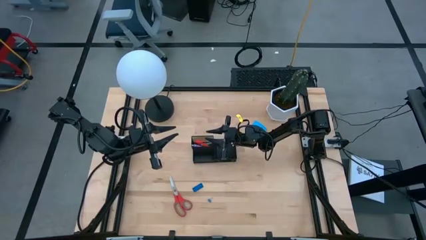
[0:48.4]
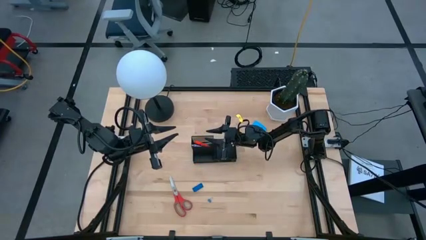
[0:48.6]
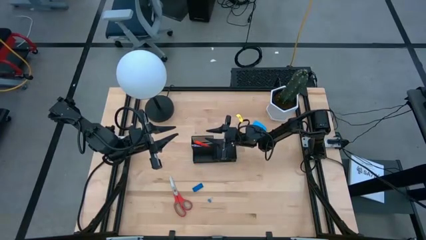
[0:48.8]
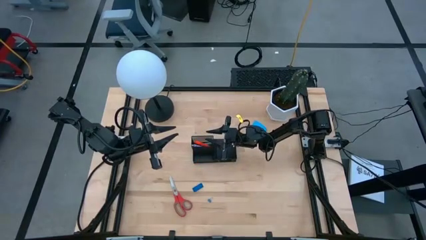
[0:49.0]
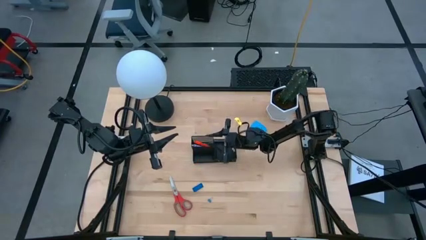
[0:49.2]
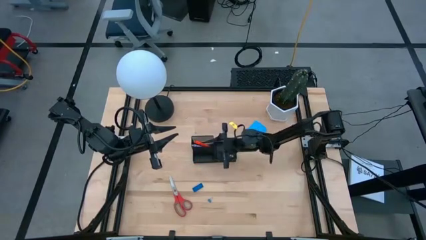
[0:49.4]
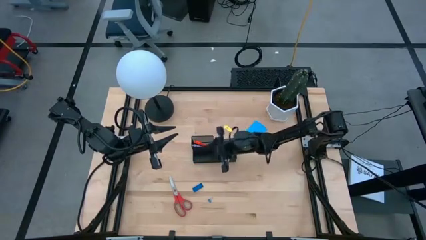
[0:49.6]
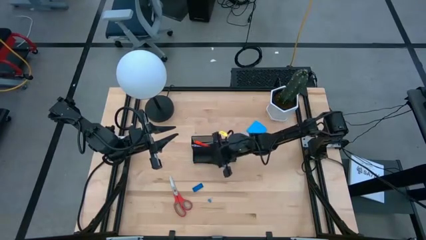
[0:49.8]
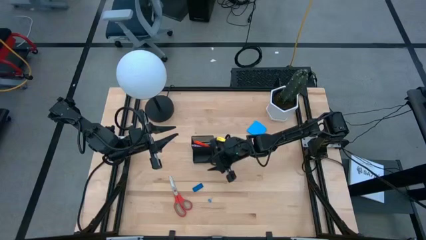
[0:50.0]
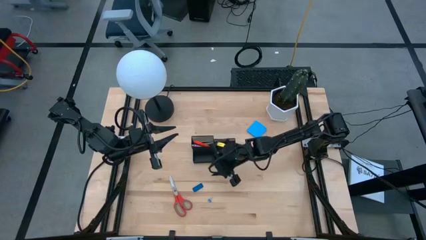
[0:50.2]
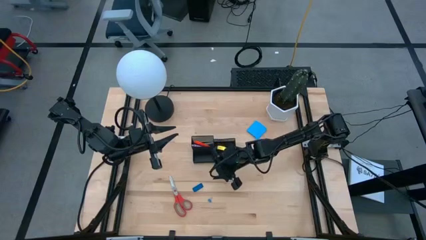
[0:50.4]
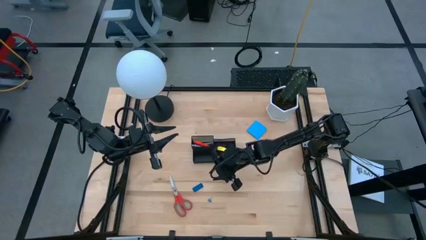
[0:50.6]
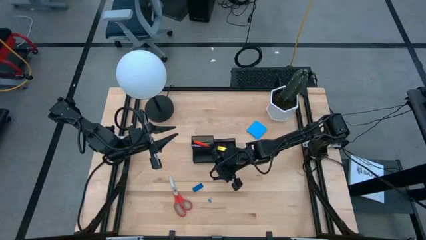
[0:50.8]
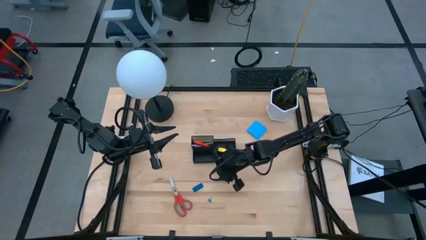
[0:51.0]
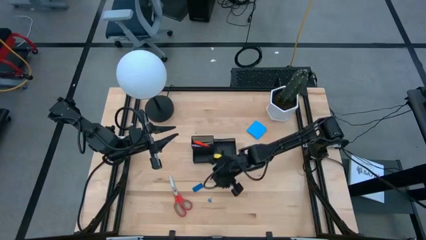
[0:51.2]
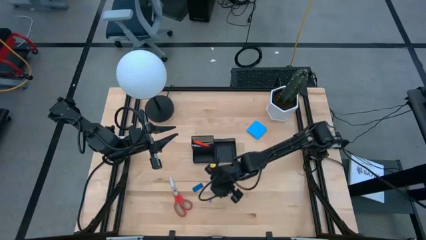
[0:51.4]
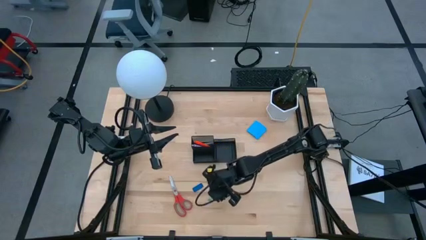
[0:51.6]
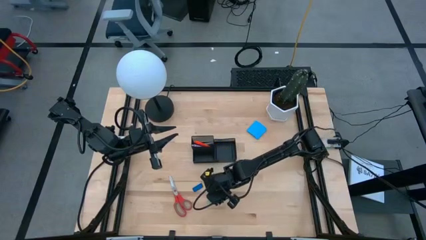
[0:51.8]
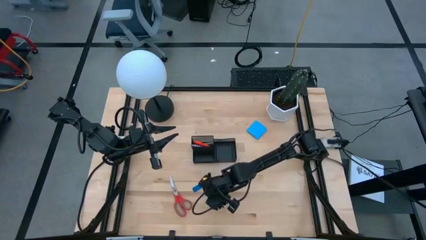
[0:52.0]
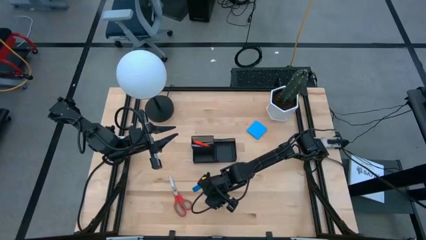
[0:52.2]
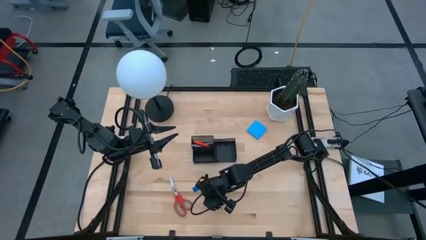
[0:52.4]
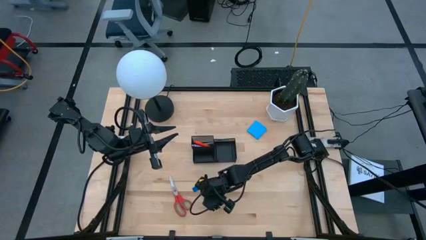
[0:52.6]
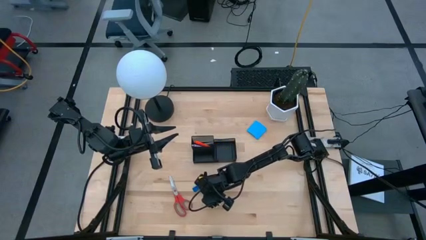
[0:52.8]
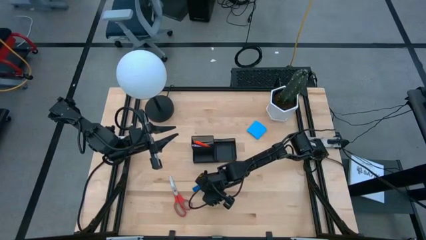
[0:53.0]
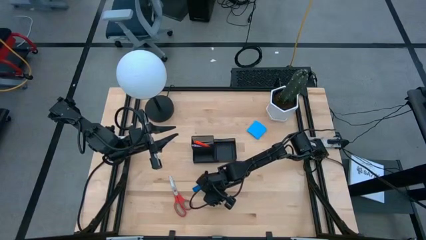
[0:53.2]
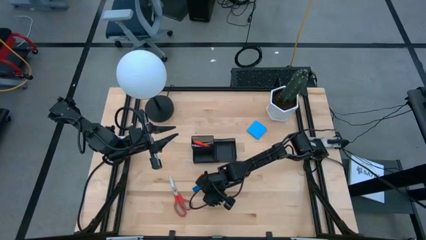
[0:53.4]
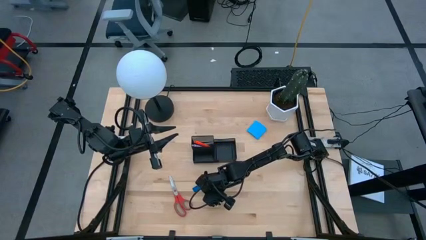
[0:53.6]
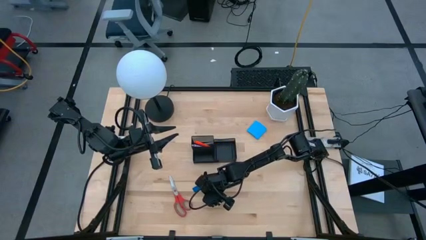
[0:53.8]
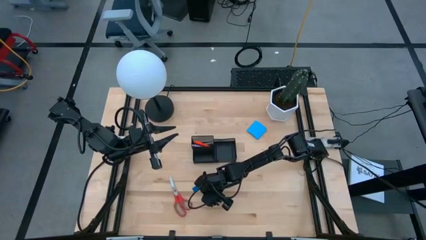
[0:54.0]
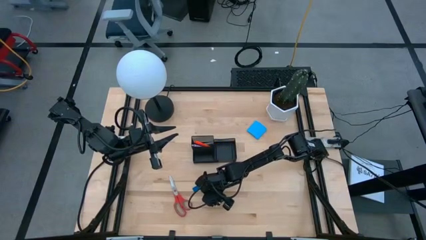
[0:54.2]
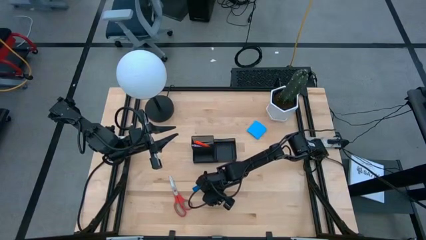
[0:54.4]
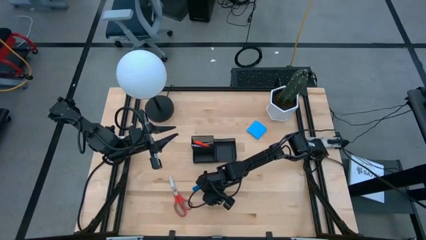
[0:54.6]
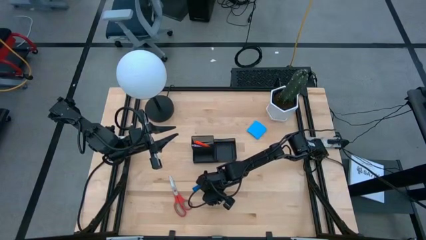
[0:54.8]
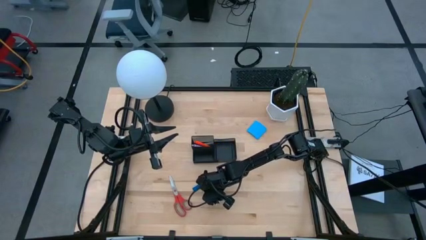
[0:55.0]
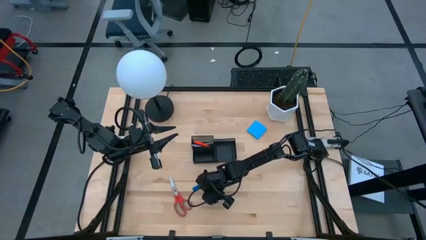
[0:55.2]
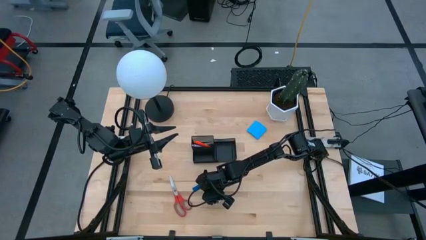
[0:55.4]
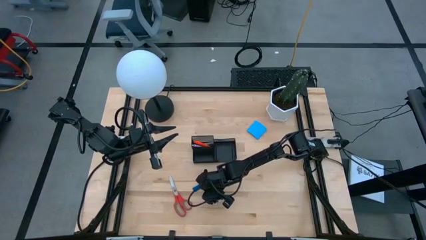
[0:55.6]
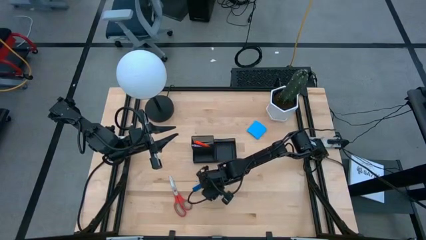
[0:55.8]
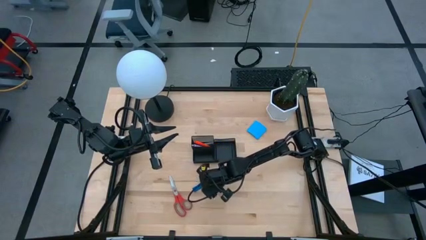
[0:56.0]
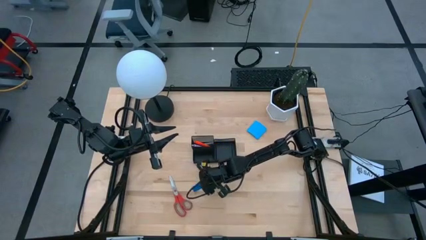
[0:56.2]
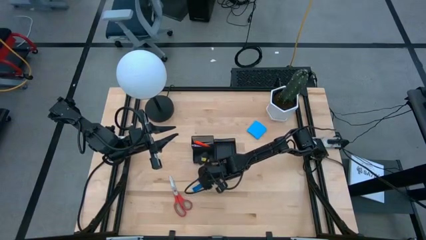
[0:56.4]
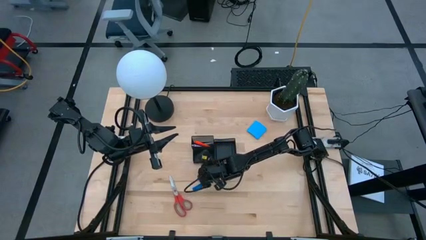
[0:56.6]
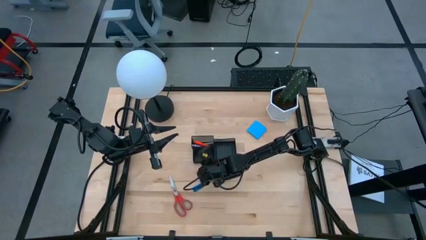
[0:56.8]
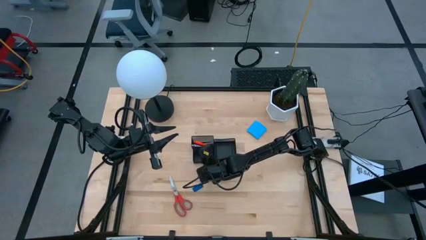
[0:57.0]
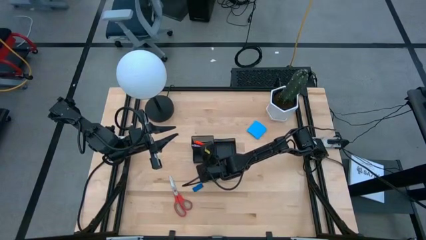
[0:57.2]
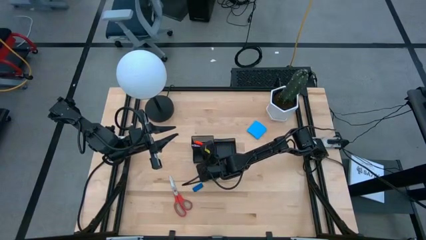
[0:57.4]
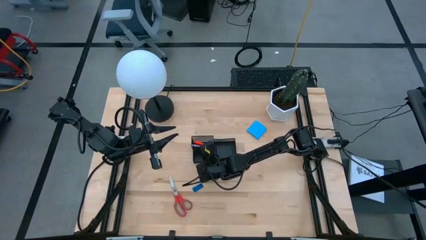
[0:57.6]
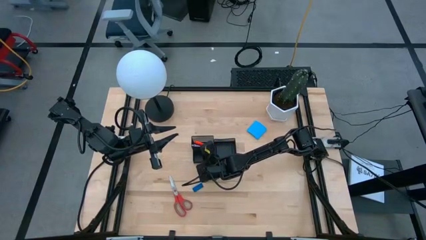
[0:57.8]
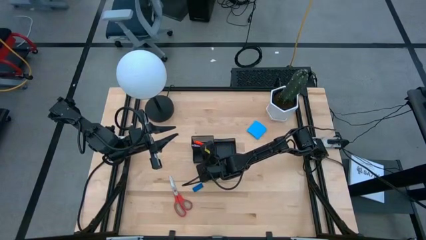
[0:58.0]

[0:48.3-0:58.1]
Task: Pick and place office supplies into organizer
Put the blue binder clip into the black desk organizer

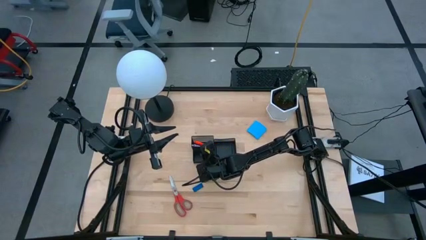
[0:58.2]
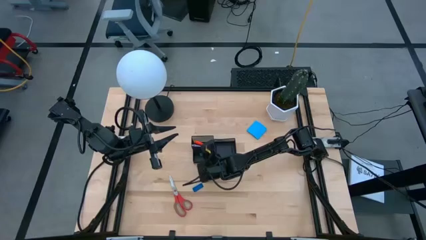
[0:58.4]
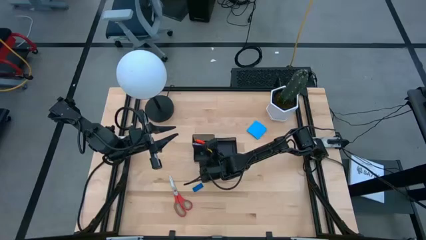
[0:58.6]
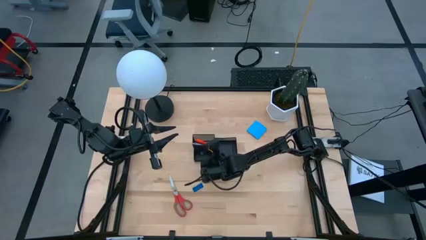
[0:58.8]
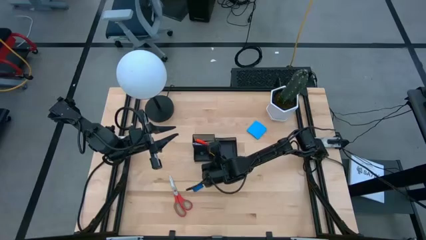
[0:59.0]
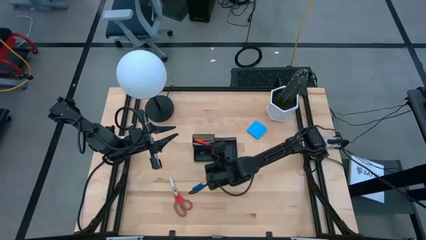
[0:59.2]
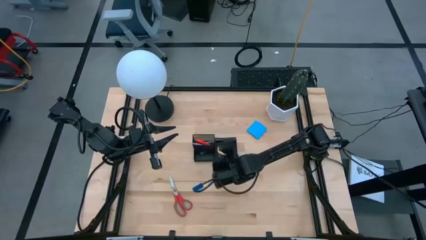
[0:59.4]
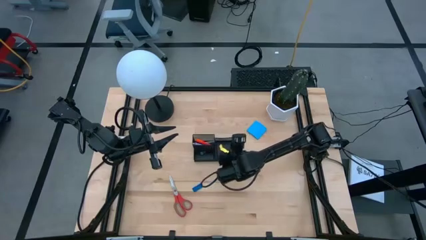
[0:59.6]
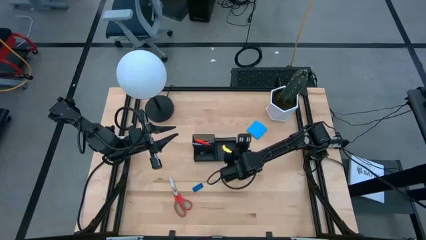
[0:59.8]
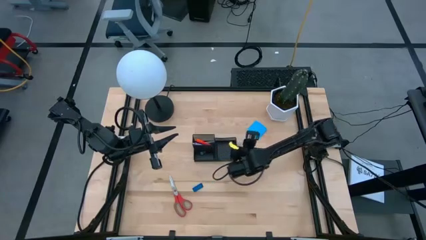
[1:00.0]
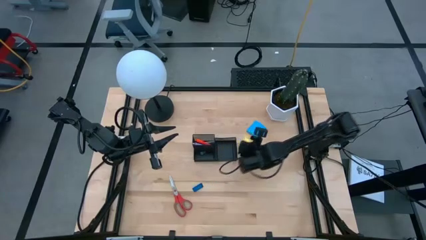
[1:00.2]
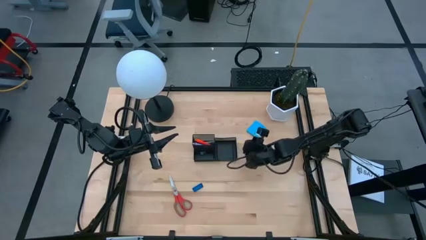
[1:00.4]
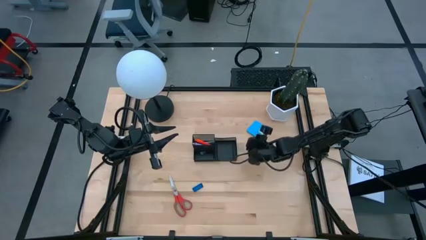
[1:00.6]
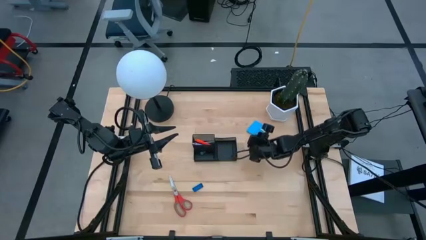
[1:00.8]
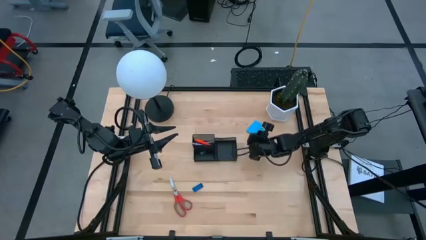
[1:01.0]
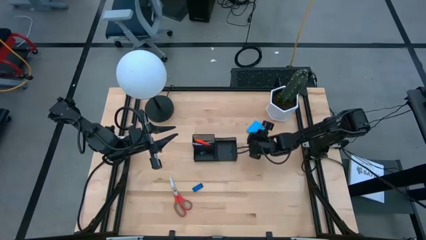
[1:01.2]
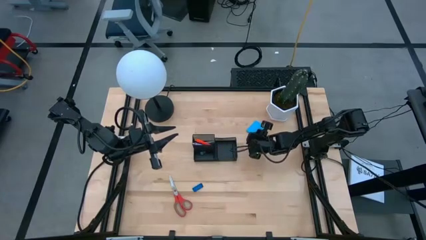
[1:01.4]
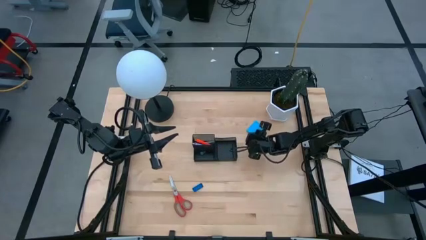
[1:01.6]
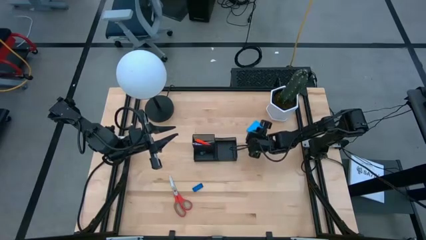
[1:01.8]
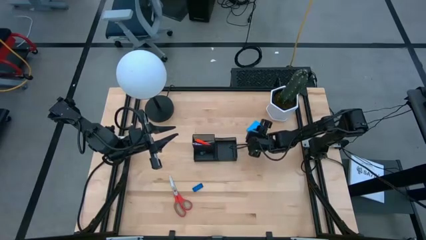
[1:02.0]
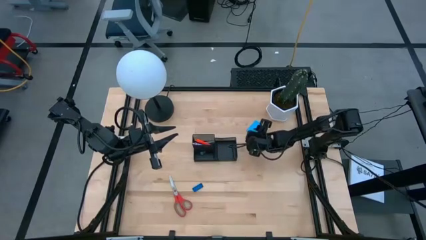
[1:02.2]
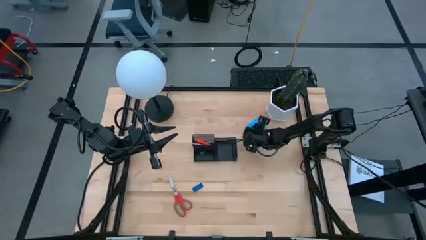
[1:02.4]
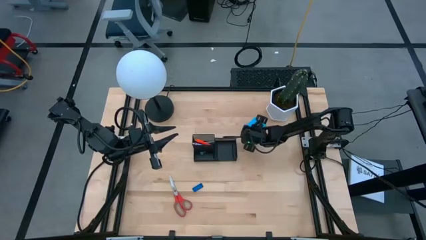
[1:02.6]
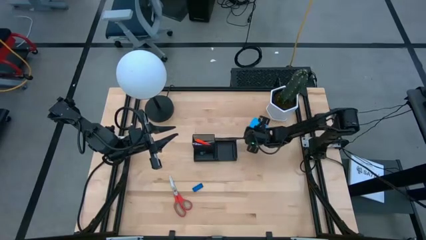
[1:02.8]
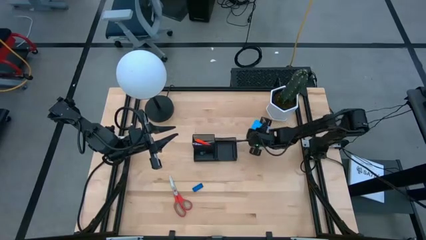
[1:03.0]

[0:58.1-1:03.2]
Put the blue sticky notes into the black desk organizer
